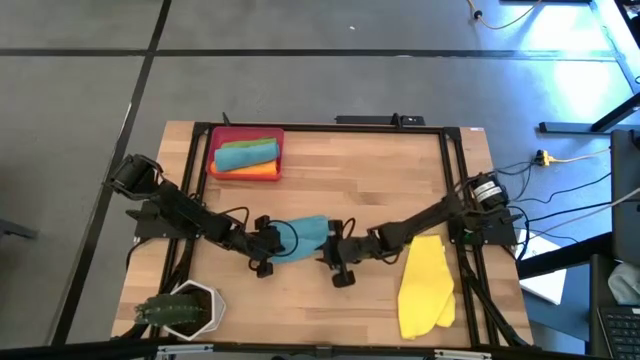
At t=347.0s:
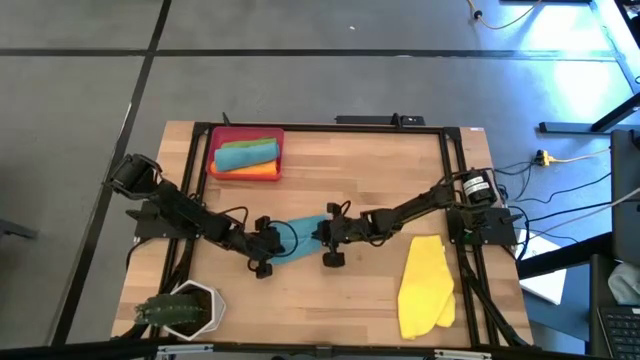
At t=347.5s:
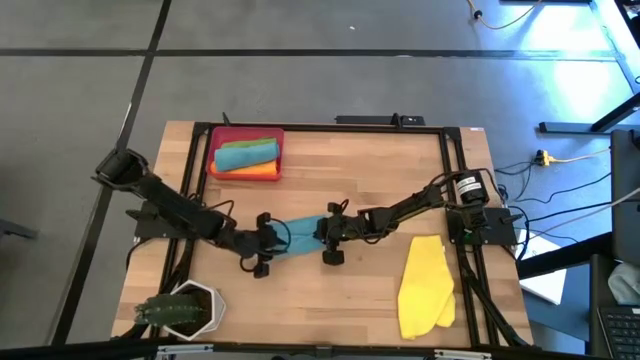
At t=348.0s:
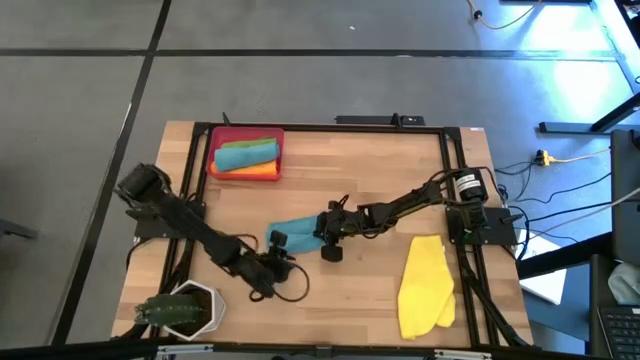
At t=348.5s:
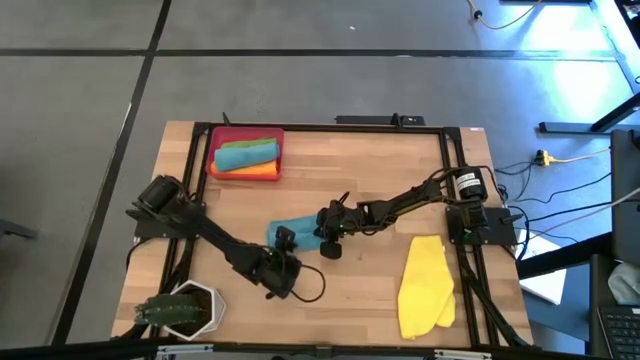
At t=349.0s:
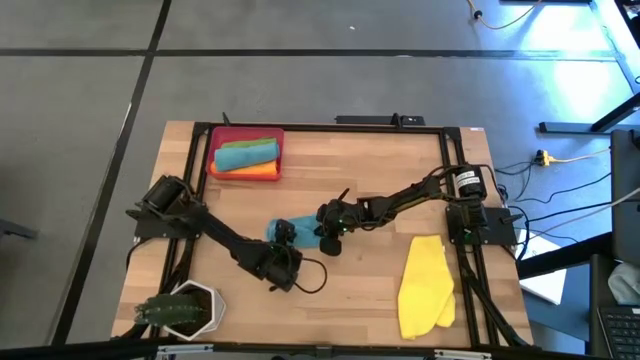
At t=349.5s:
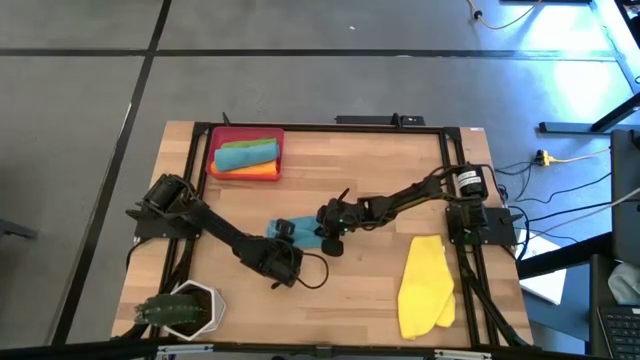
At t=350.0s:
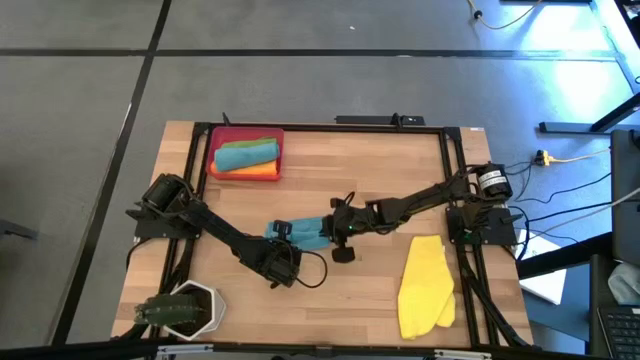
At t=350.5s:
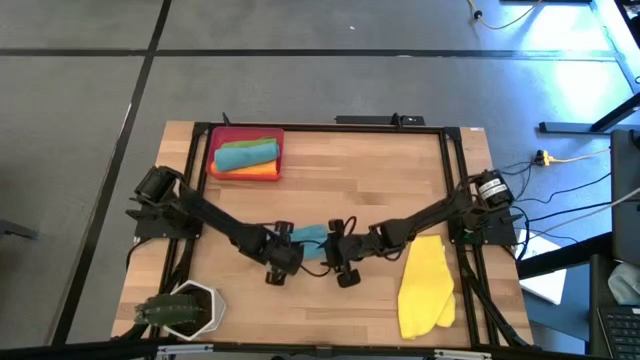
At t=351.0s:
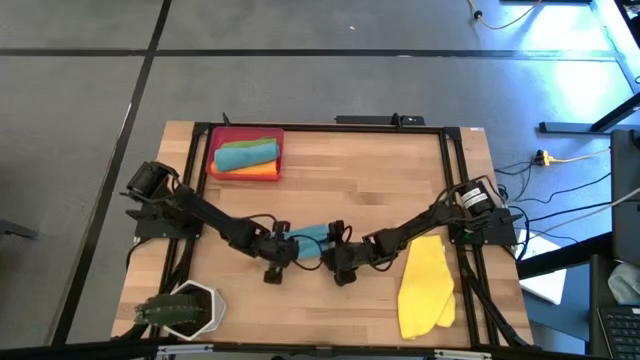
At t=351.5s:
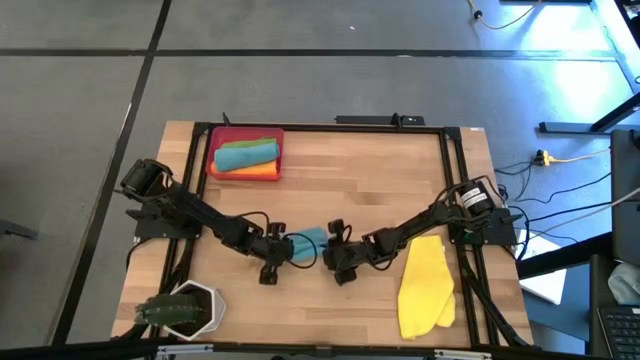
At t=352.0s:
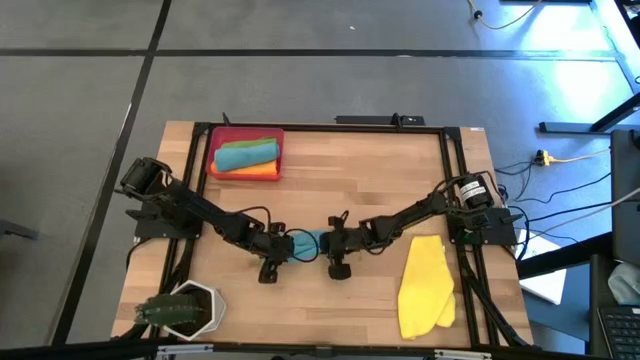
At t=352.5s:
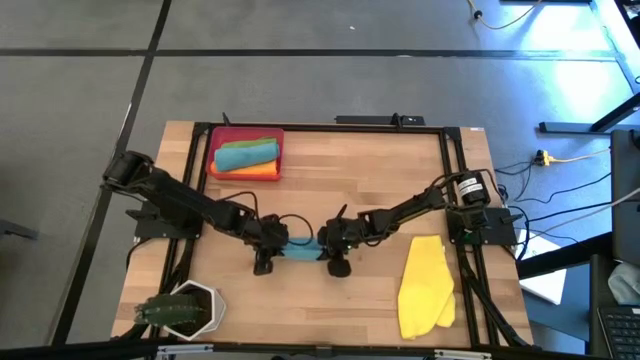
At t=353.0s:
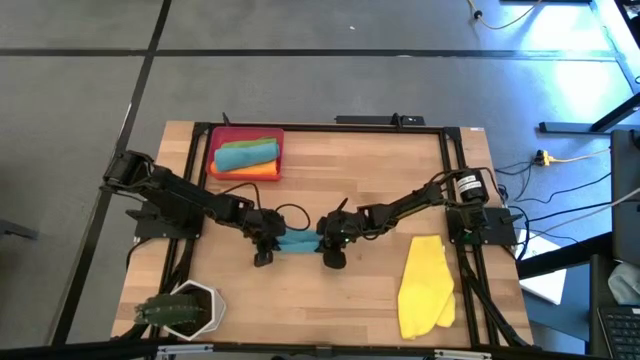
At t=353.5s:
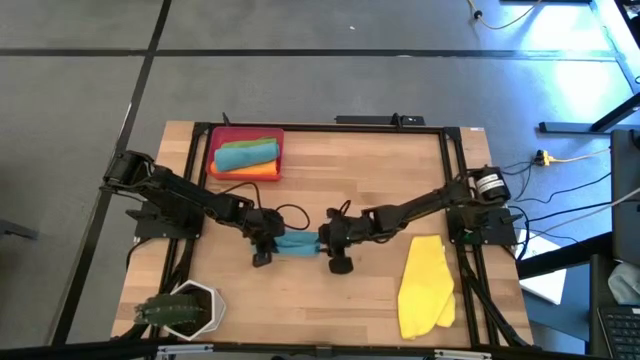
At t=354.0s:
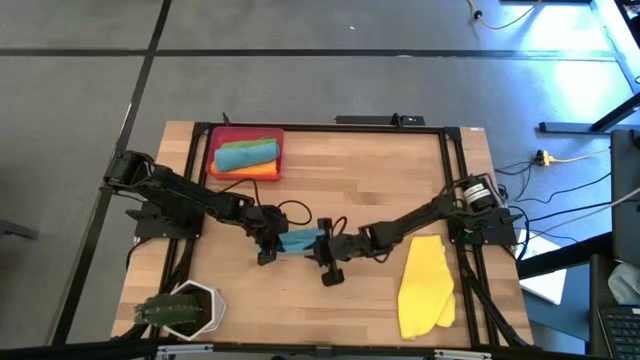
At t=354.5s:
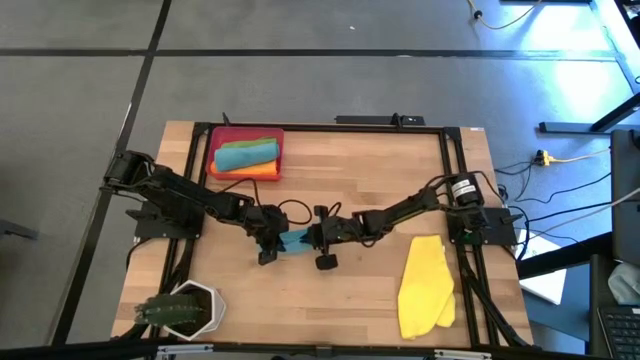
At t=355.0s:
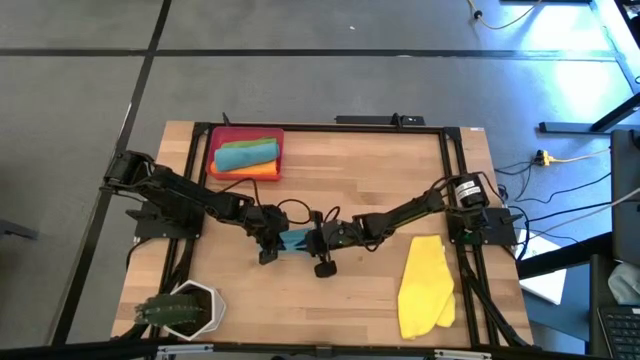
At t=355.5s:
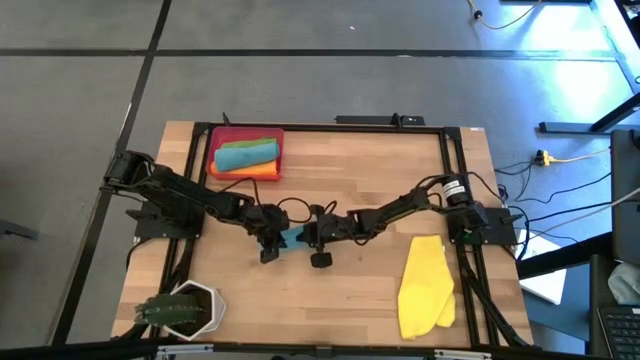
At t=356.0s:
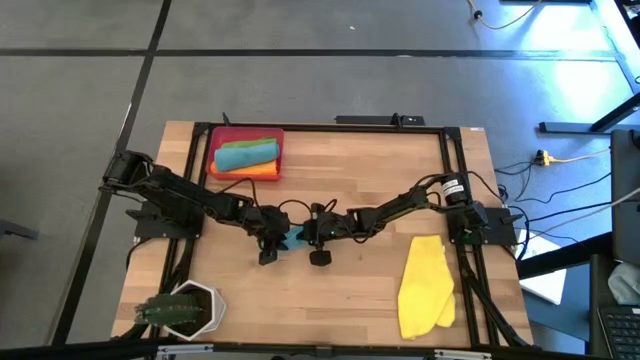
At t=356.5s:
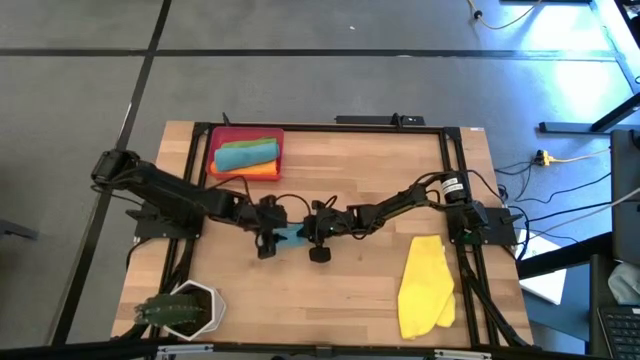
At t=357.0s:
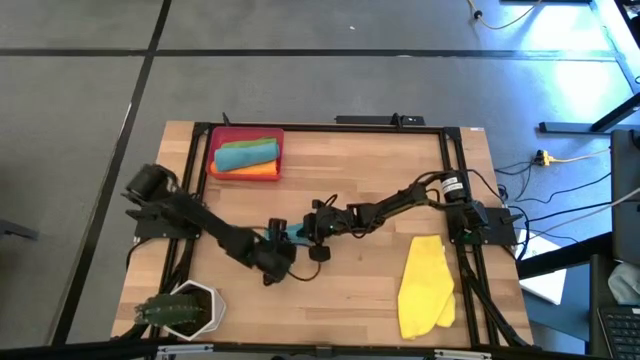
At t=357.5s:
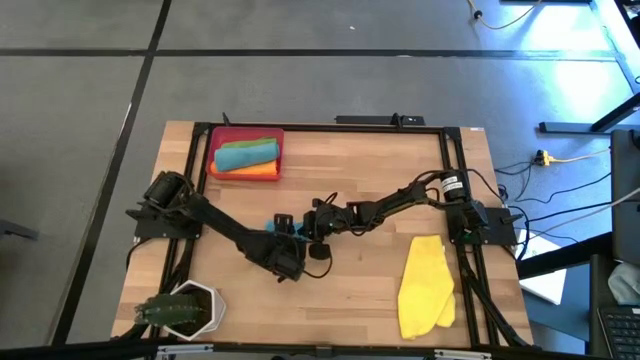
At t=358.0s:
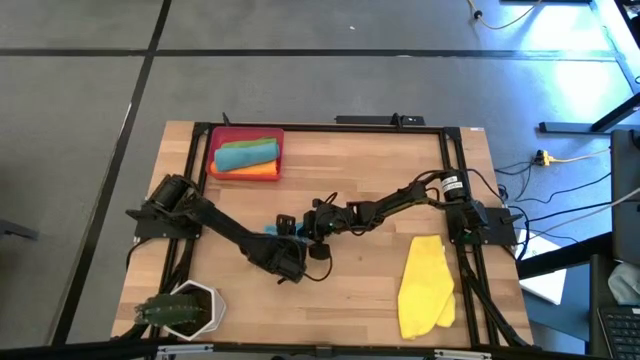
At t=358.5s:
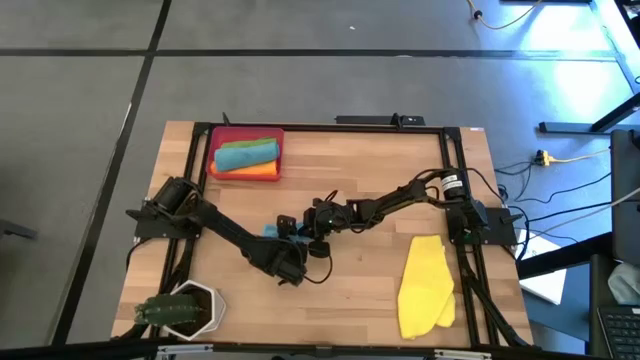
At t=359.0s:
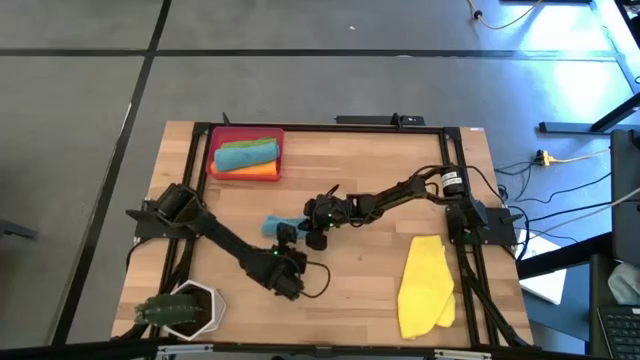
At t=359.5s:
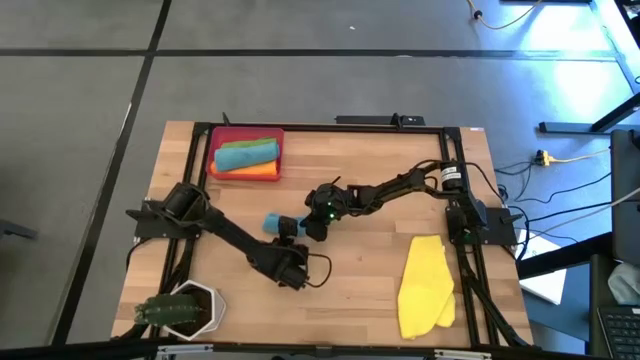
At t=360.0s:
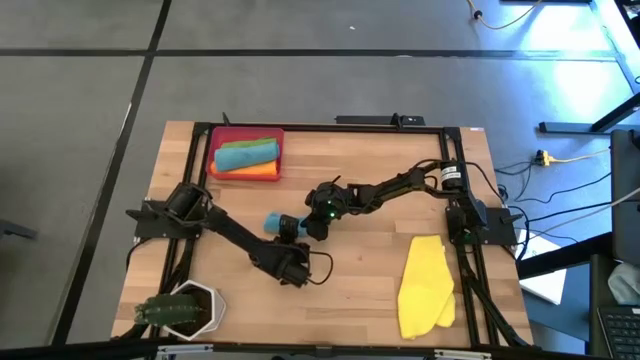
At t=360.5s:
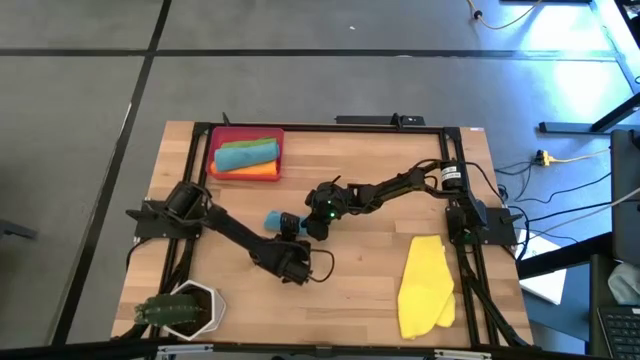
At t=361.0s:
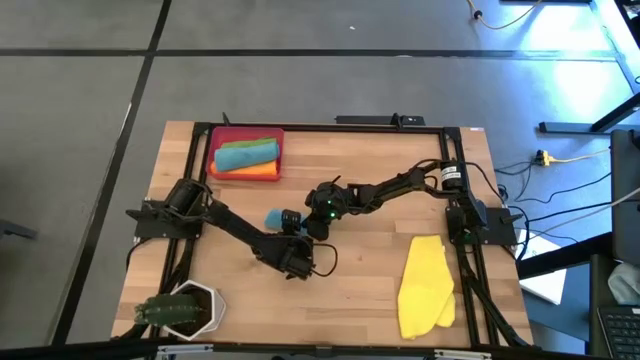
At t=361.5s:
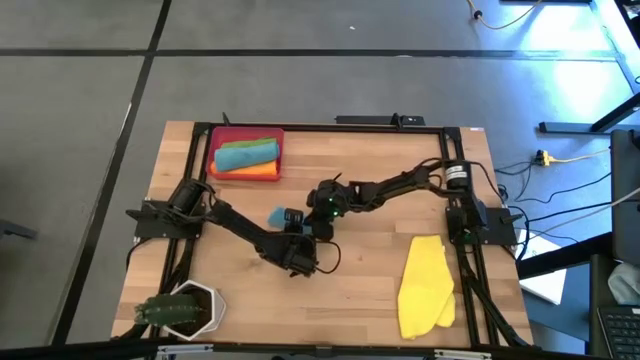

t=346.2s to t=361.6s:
Task: Roll microfiber towels into tight, uniform cylinder then place into a basket
Roll the blue microfiber towel

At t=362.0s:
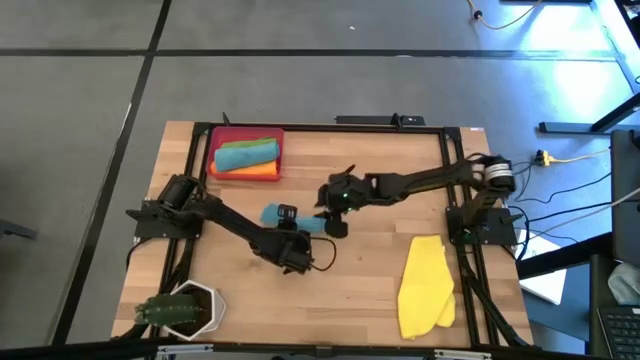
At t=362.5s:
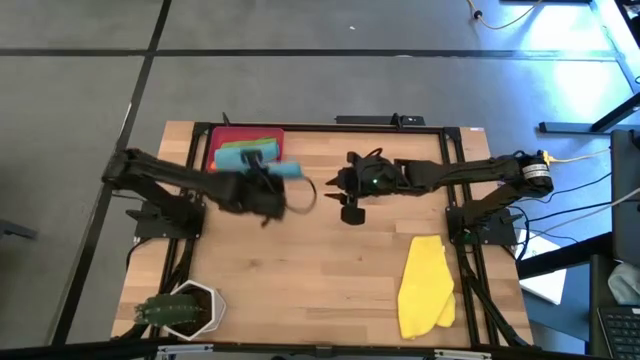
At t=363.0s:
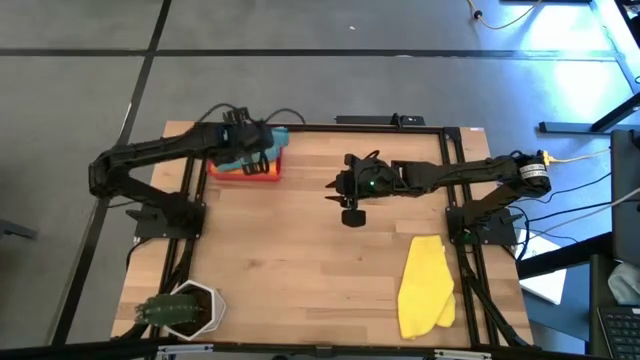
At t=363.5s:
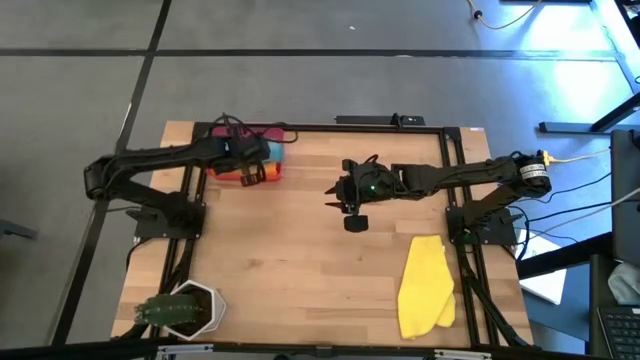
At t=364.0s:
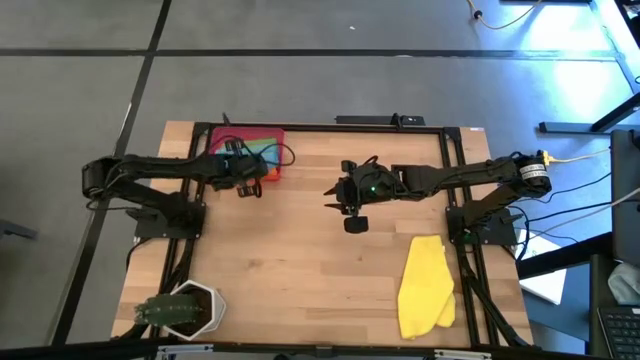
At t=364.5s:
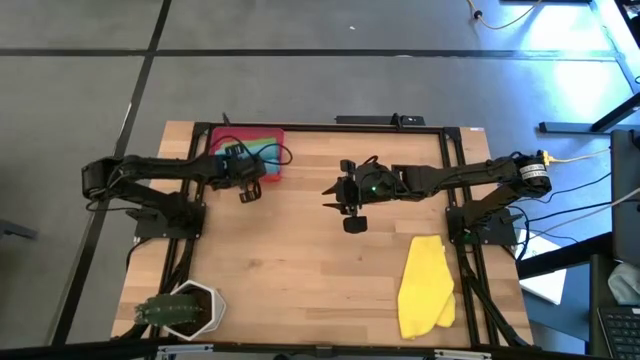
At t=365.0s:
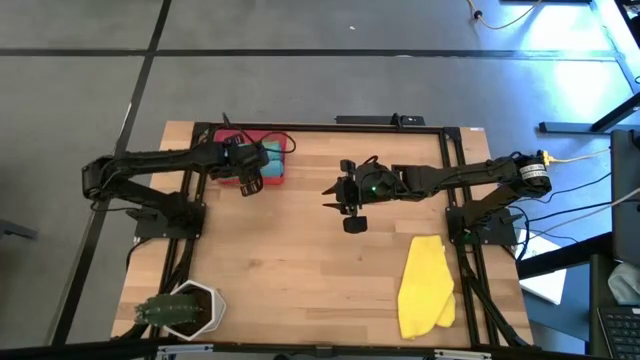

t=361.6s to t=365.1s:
Put the rolled blue microfiber towel into the red bin

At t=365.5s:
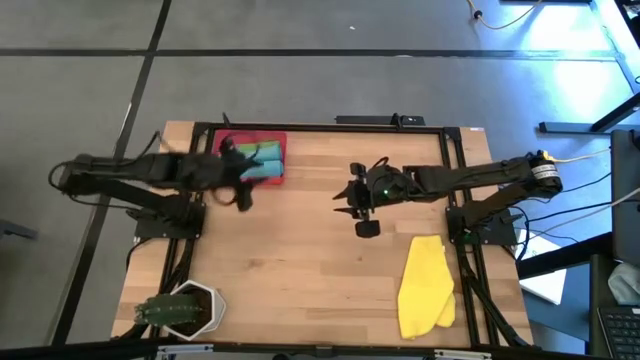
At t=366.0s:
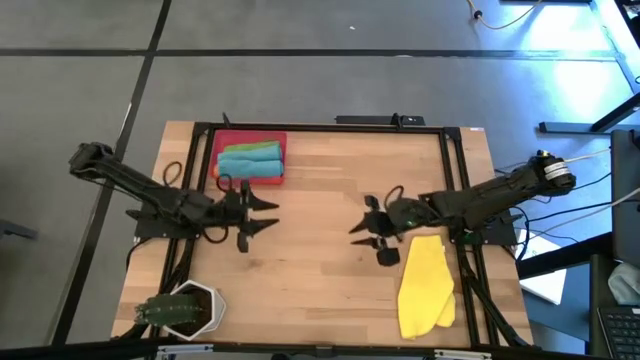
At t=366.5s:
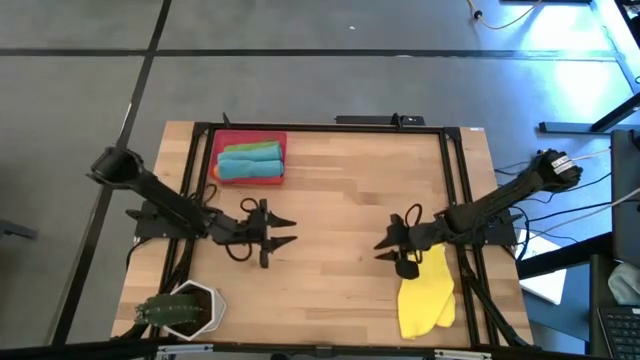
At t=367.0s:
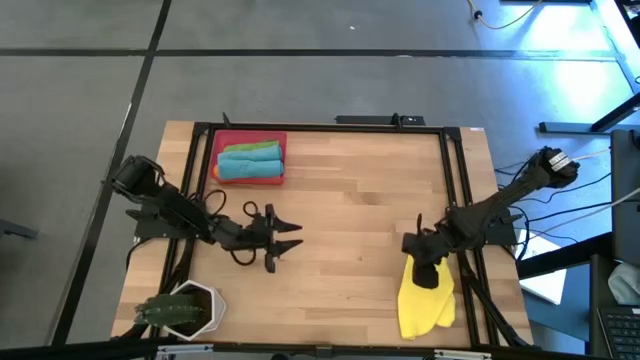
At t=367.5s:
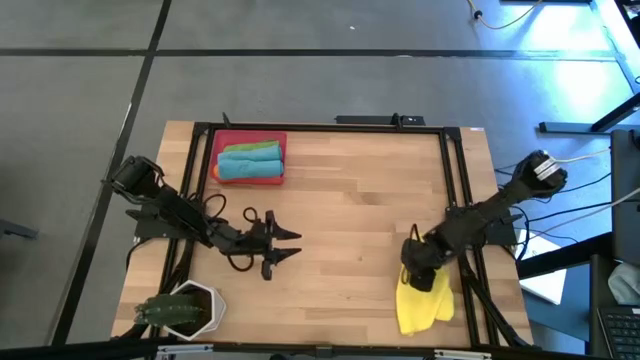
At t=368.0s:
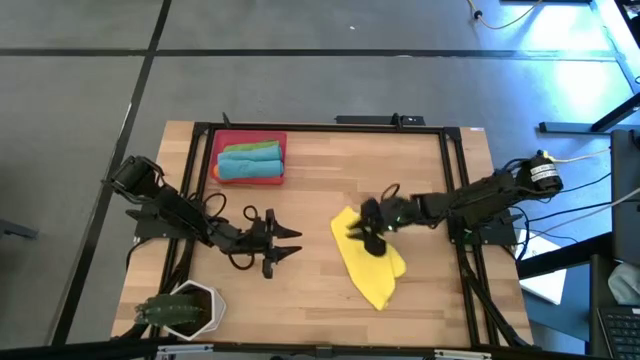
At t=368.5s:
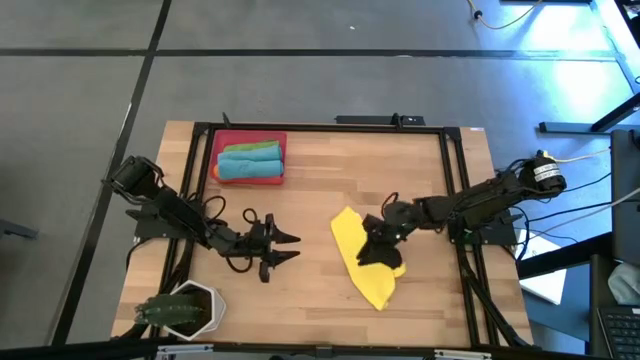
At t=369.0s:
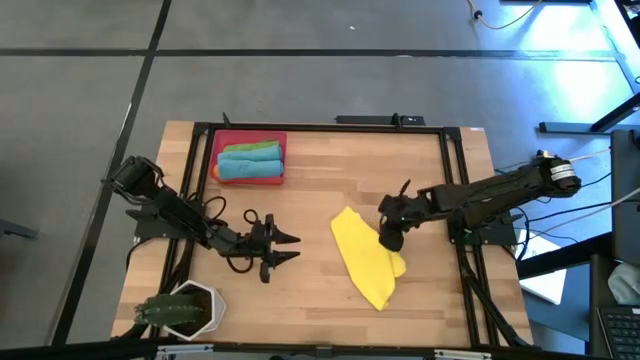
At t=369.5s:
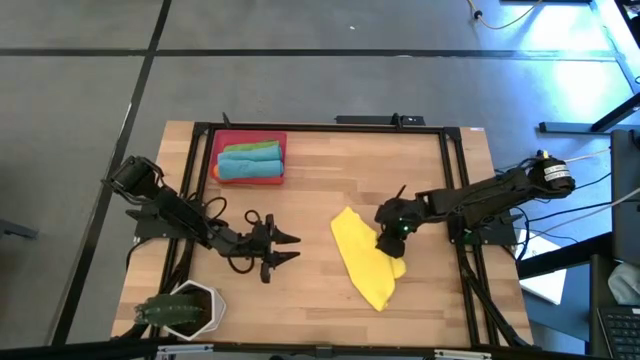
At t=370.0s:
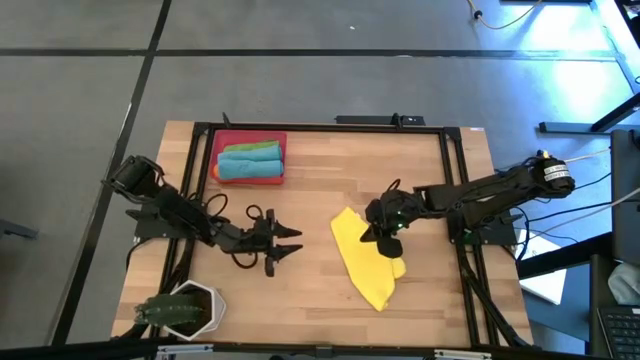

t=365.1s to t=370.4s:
Fold the yellow microfiber towel
